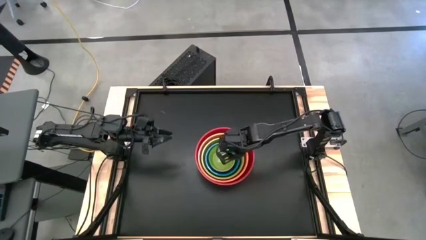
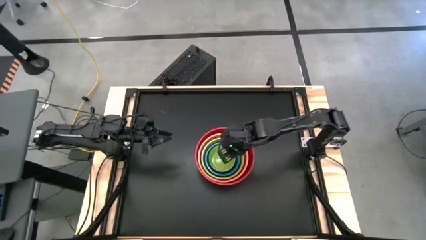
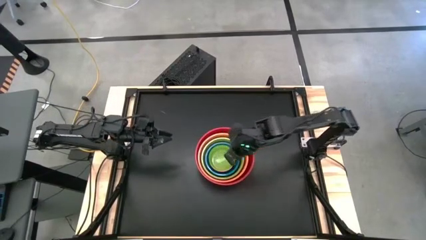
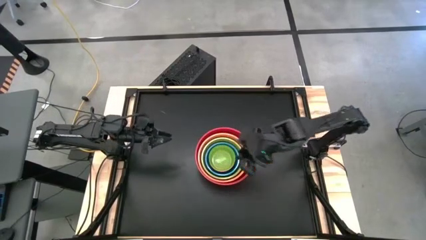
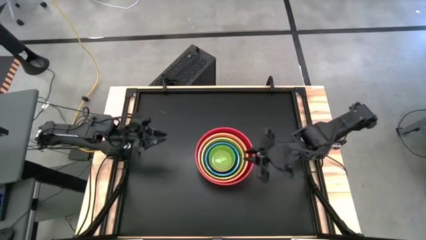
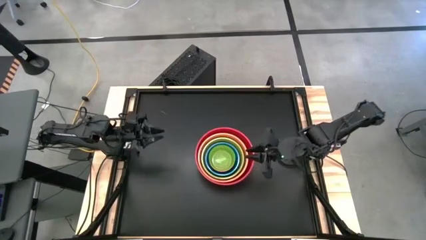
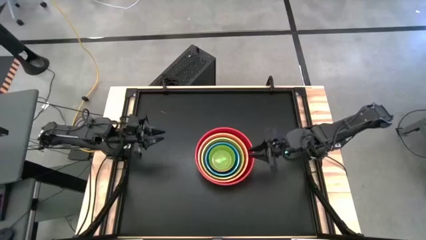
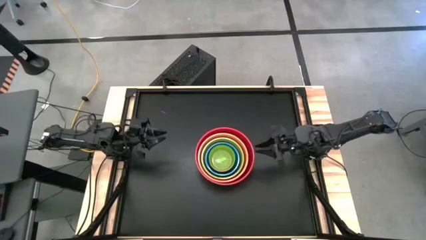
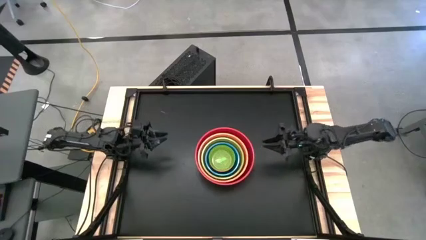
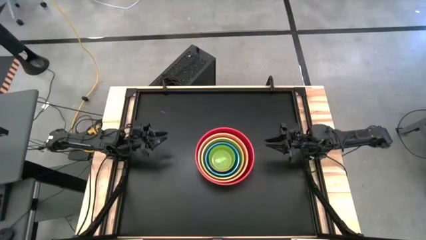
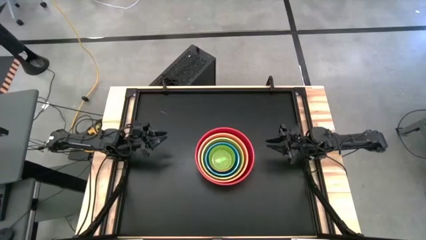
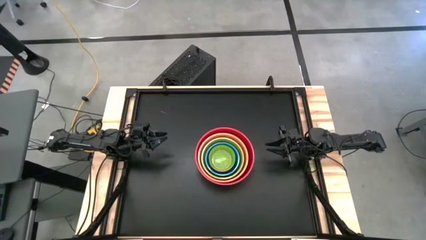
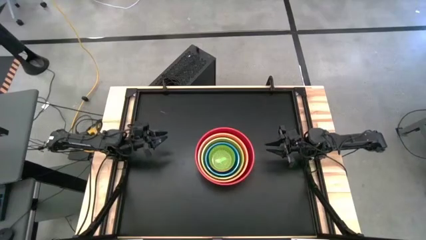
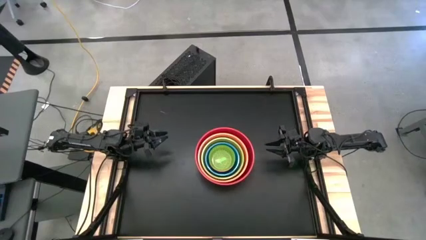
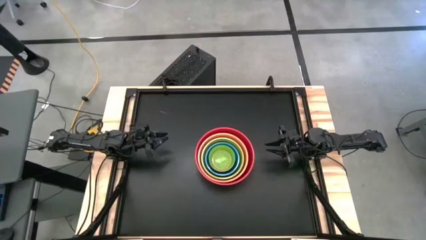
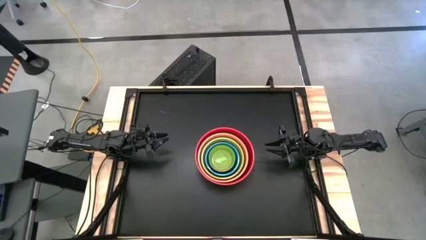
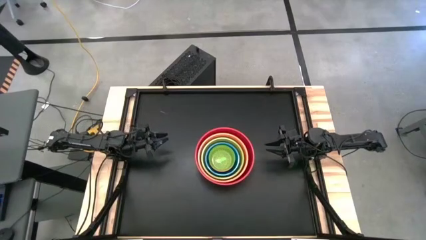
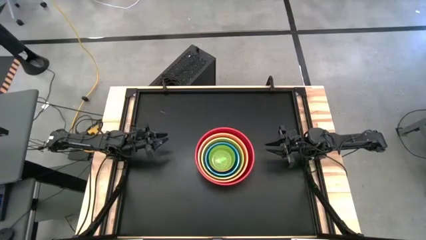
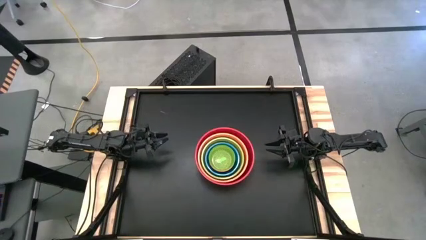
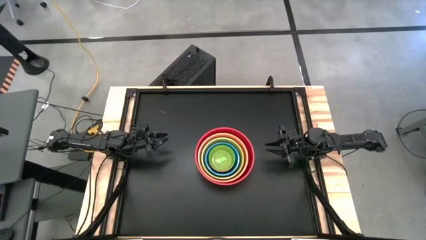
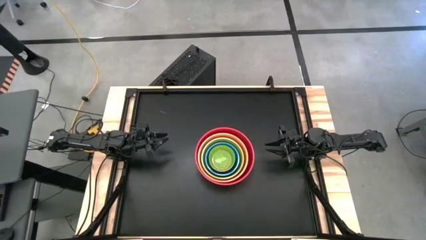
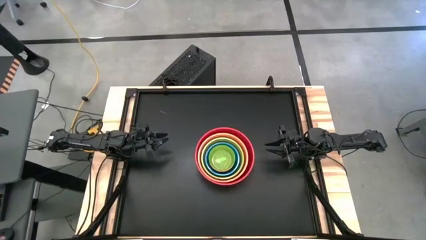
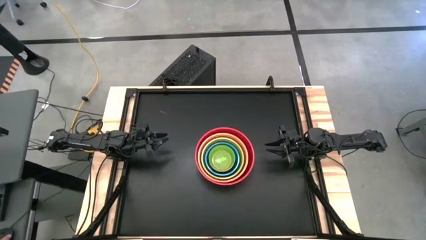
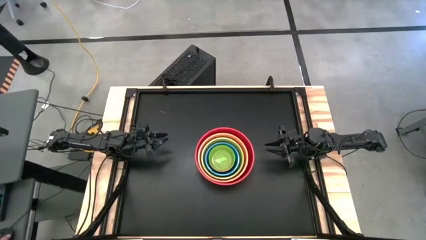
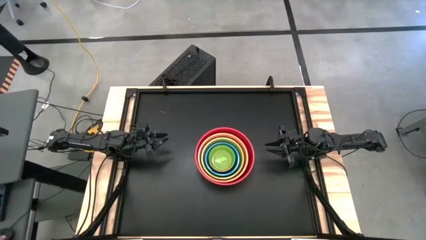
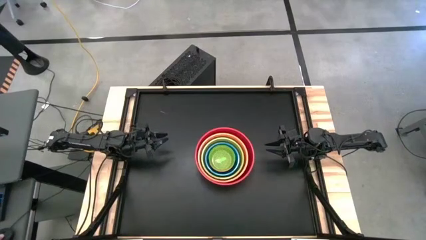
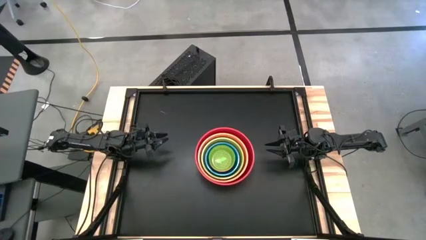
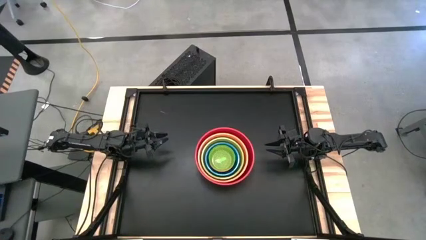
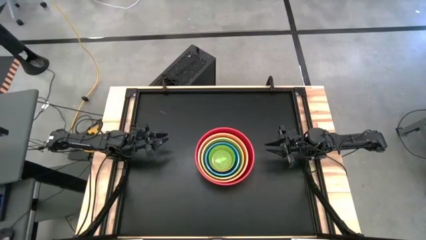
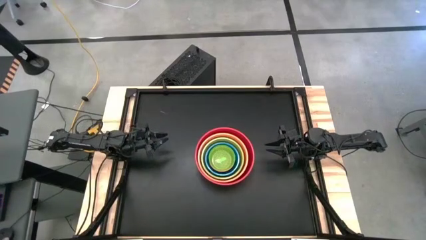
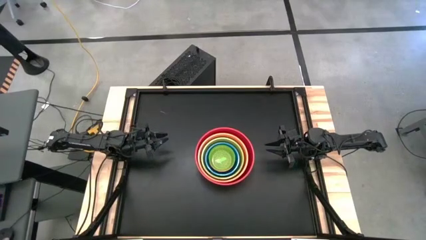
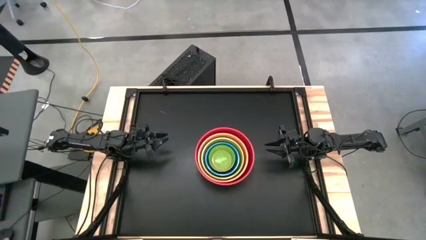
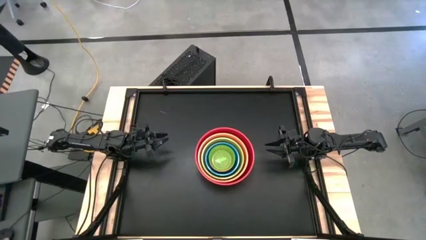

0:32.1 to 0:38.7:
Return to Home Position

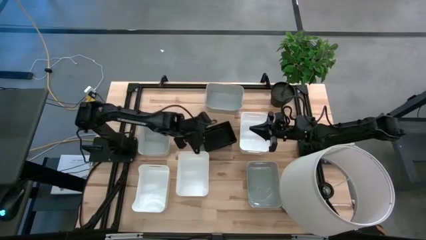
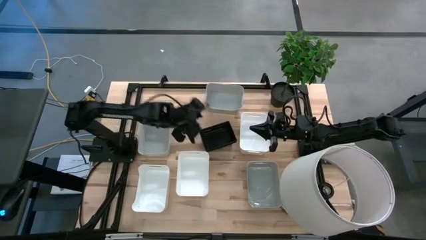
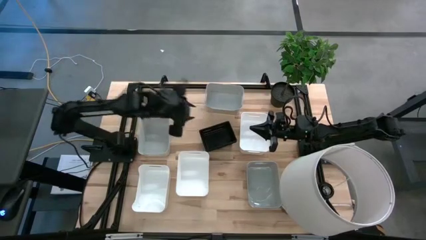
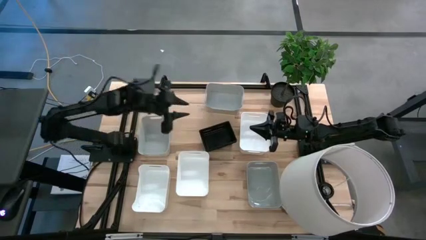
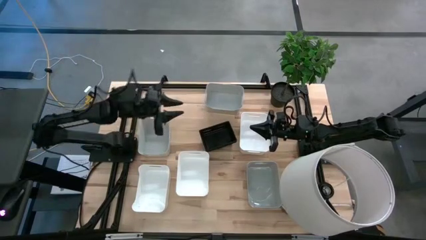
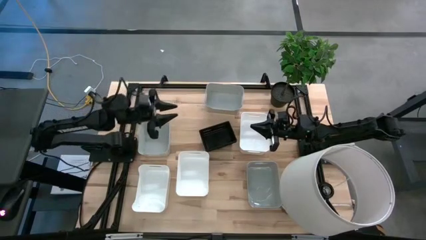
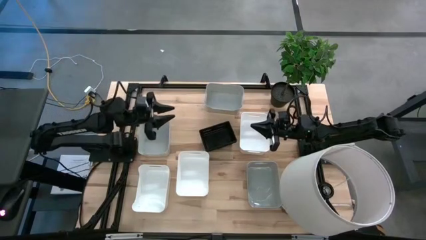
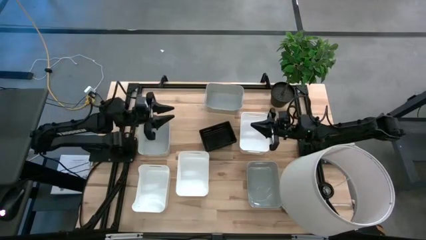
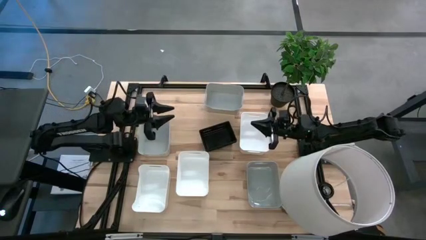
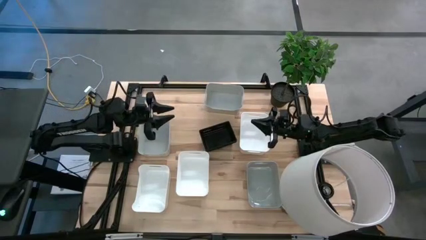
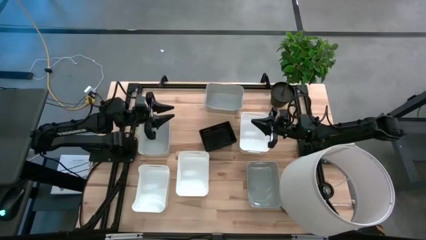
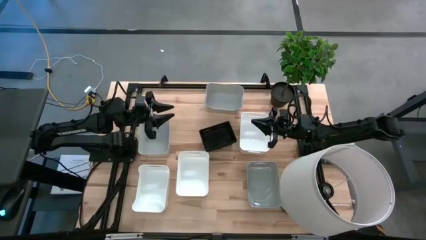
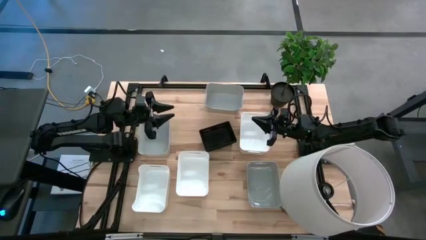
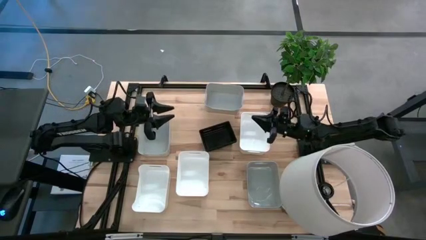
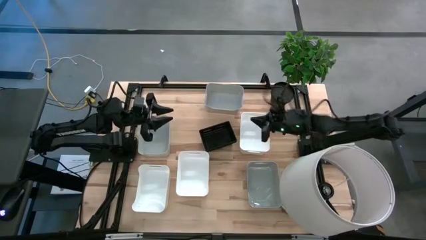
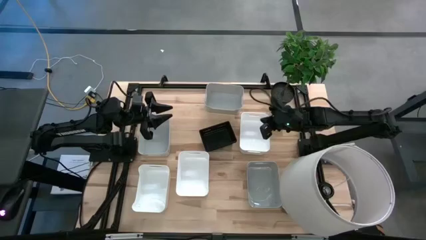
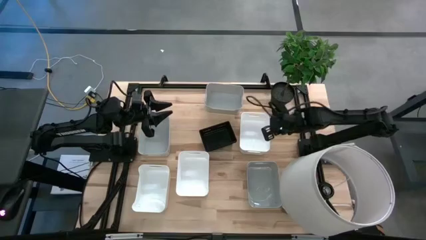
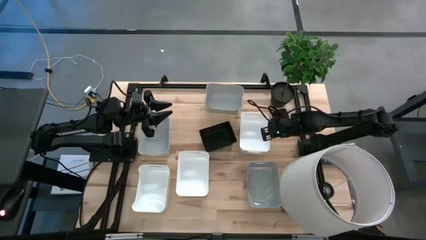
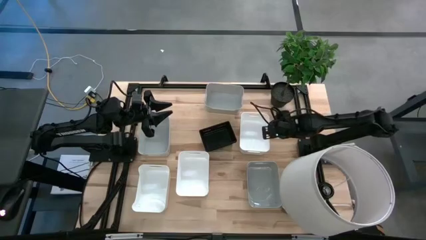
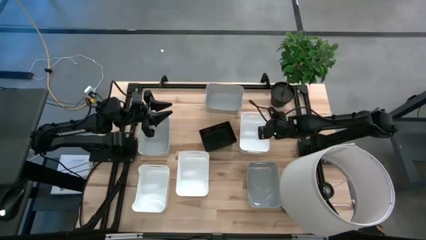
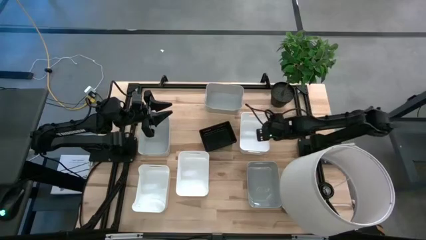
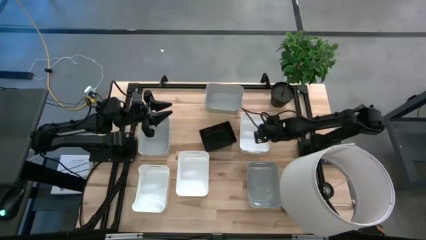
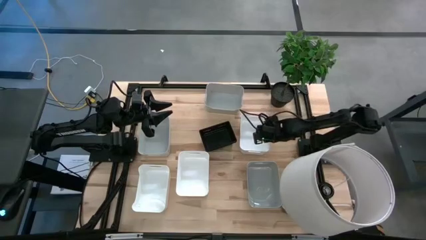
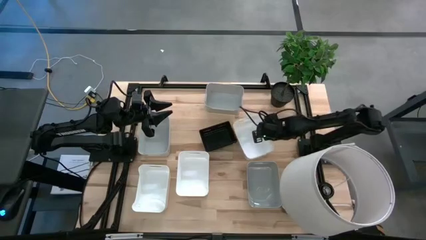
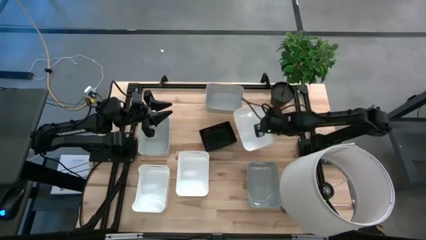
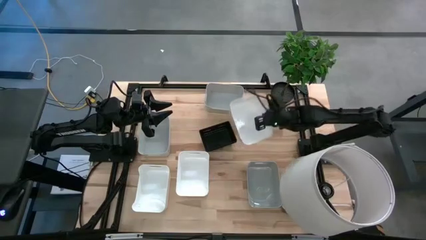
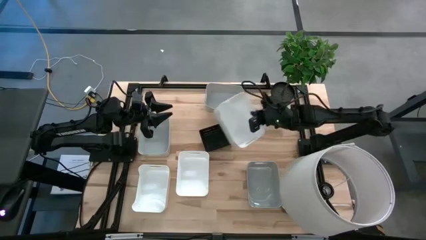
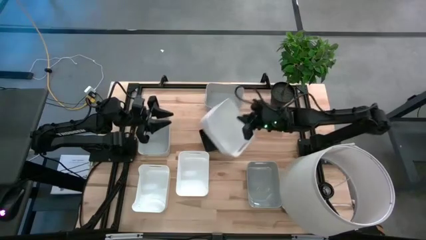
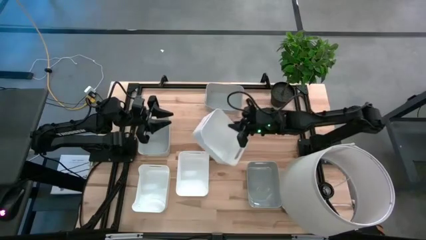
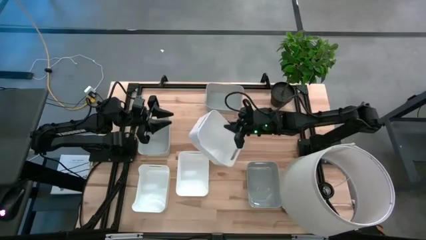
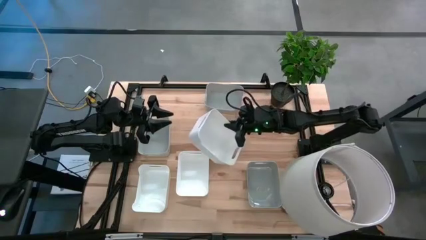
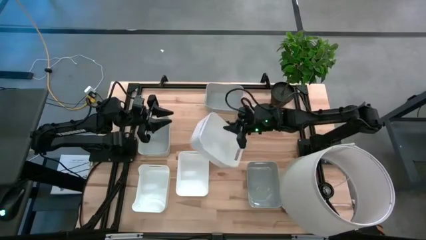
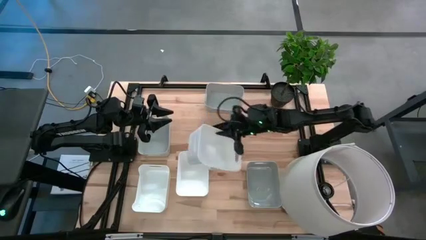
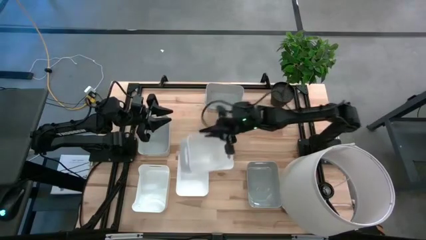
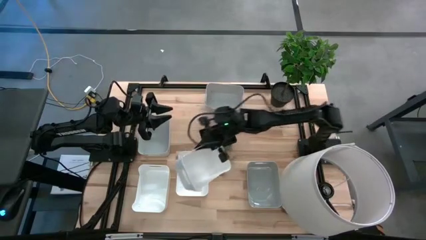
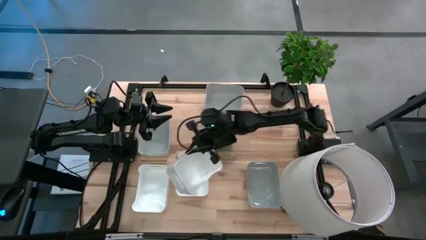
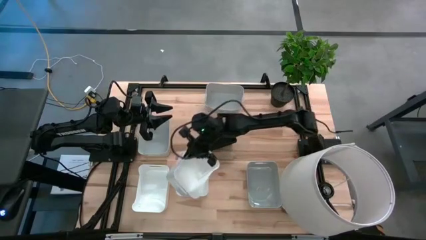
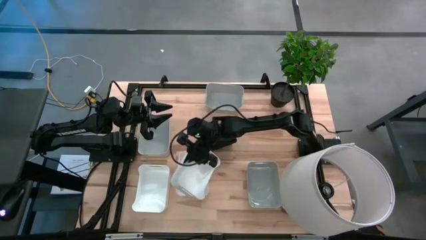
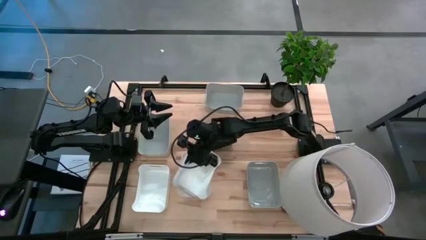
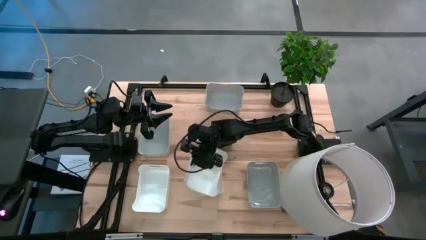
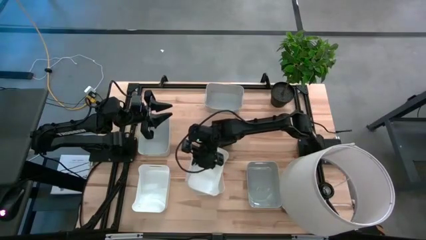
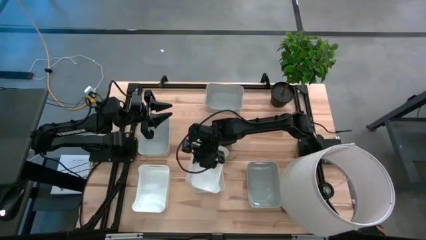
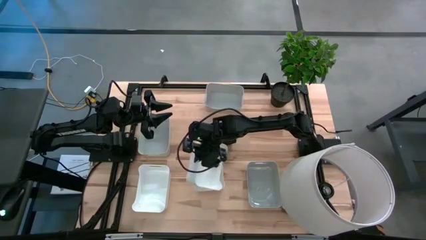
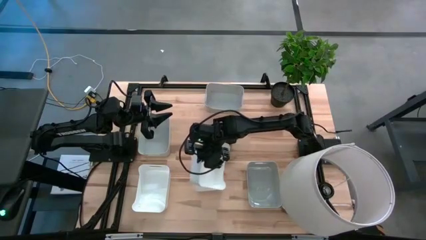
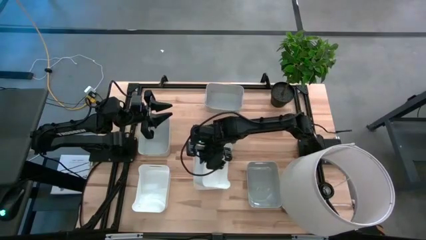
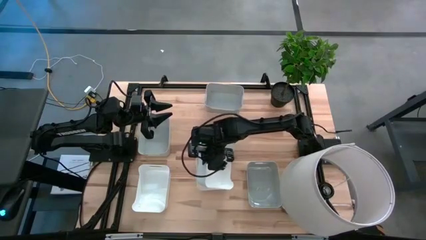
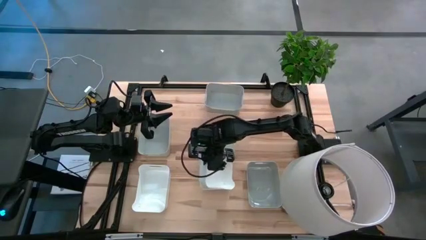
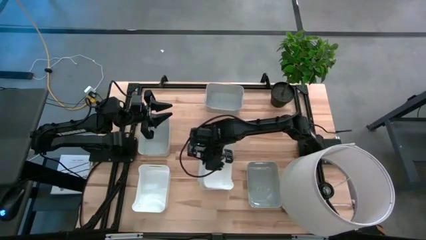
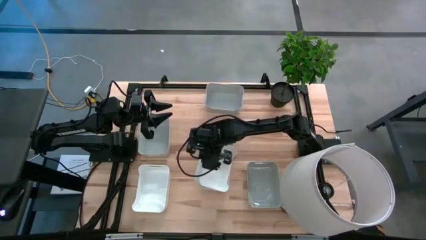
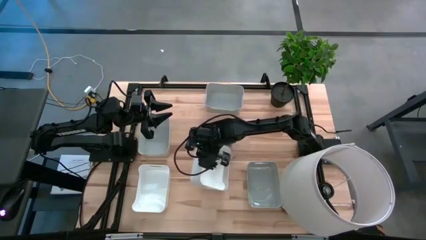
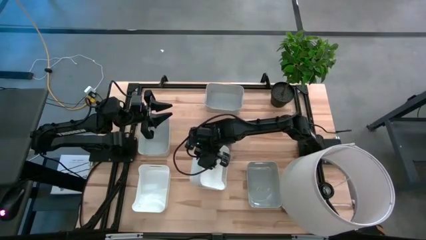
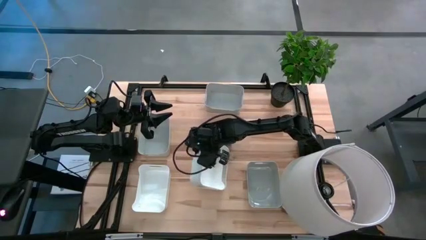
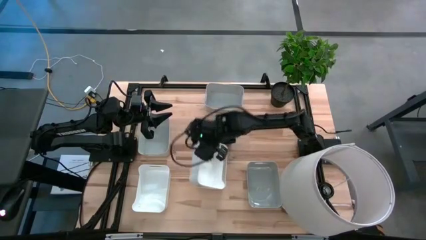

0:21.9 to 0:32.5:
Stack the top white bin on top of the right white bin
